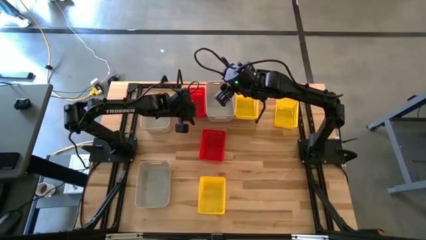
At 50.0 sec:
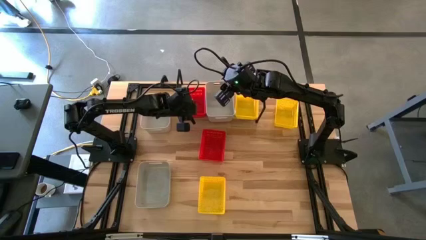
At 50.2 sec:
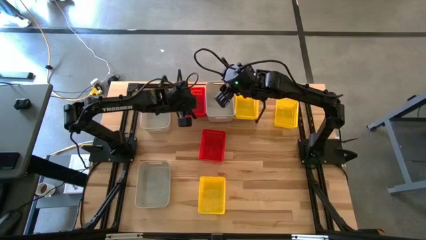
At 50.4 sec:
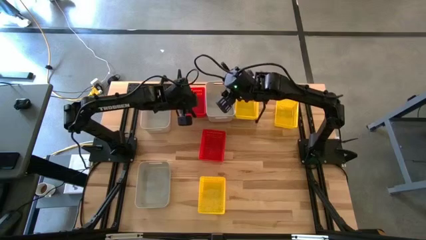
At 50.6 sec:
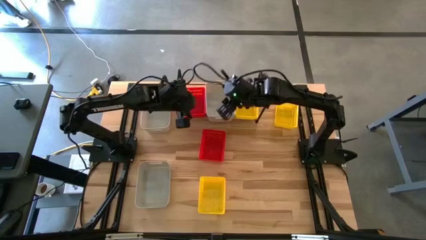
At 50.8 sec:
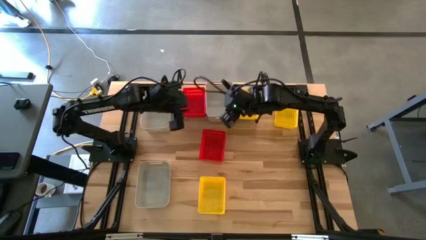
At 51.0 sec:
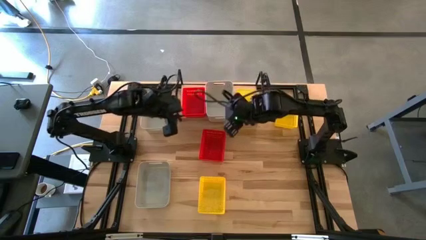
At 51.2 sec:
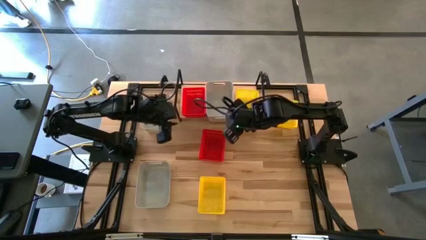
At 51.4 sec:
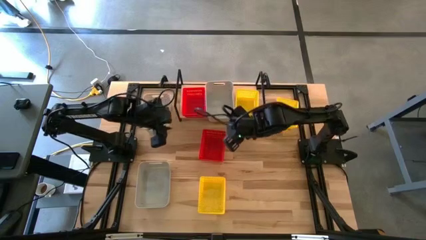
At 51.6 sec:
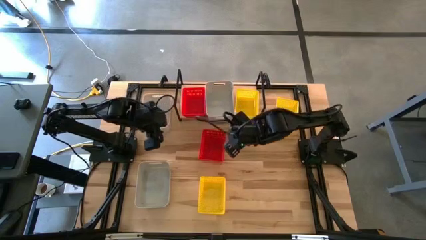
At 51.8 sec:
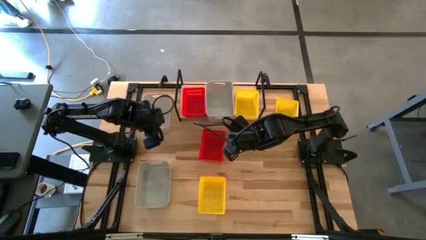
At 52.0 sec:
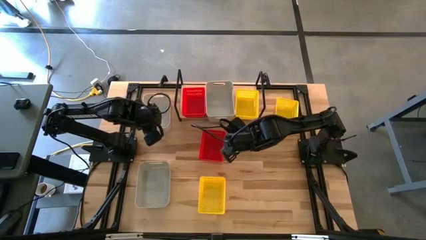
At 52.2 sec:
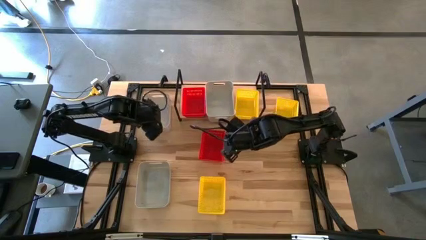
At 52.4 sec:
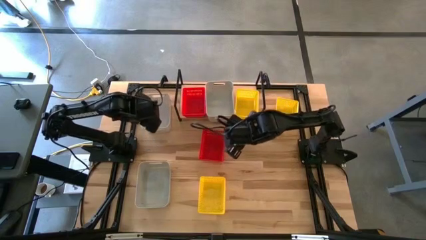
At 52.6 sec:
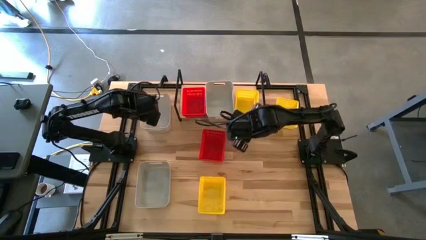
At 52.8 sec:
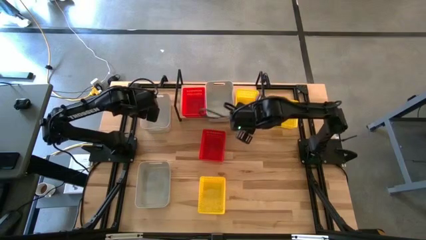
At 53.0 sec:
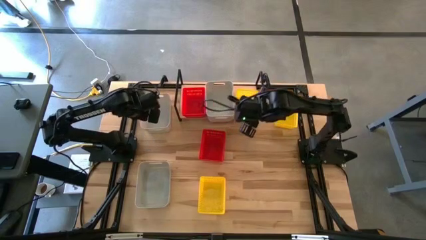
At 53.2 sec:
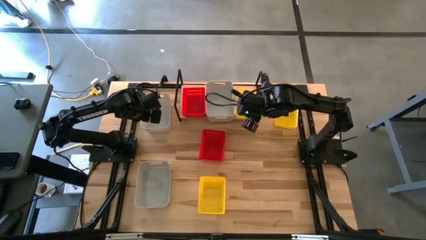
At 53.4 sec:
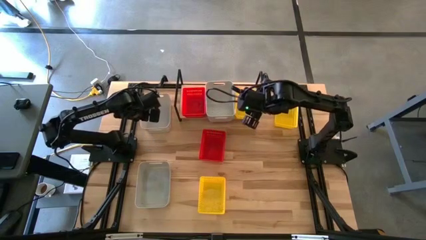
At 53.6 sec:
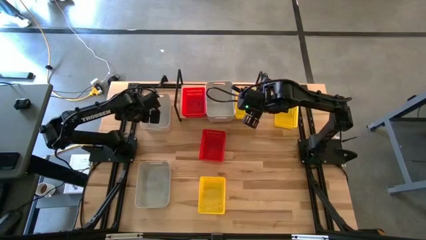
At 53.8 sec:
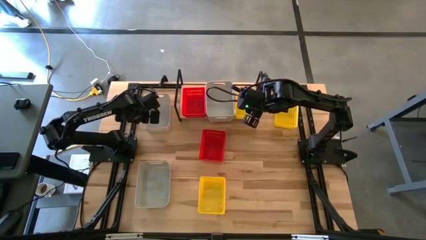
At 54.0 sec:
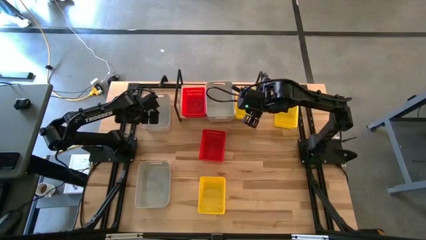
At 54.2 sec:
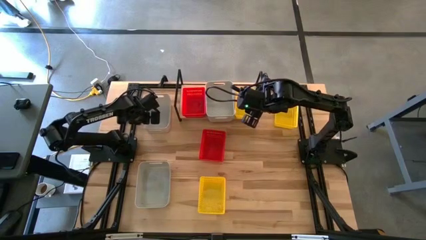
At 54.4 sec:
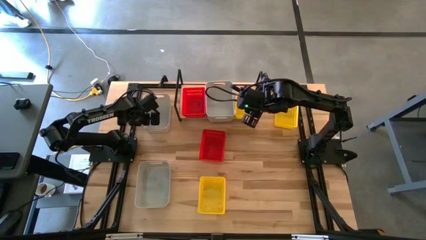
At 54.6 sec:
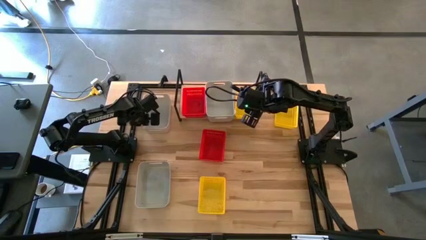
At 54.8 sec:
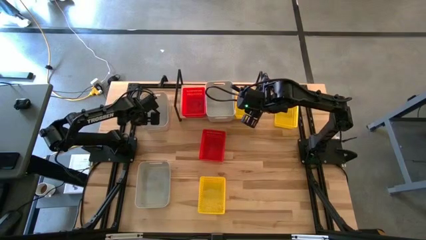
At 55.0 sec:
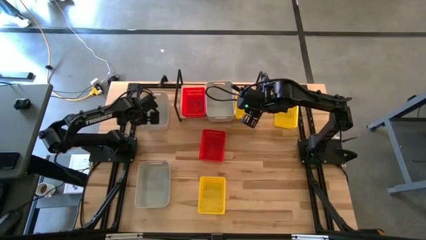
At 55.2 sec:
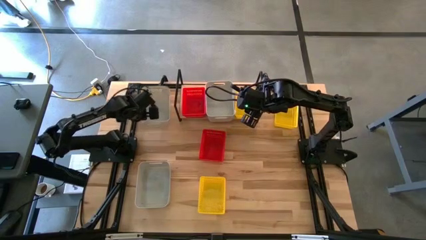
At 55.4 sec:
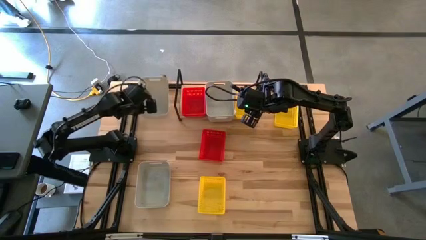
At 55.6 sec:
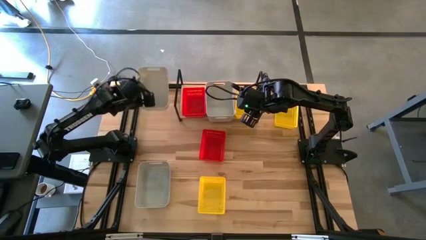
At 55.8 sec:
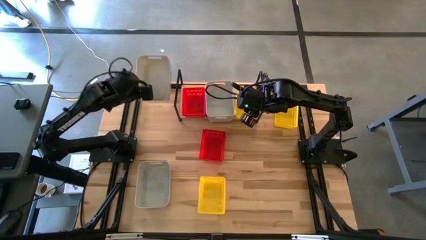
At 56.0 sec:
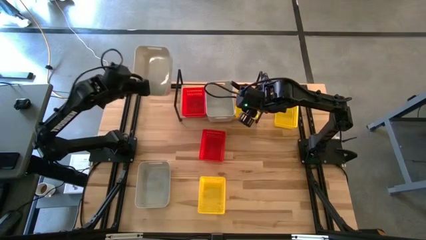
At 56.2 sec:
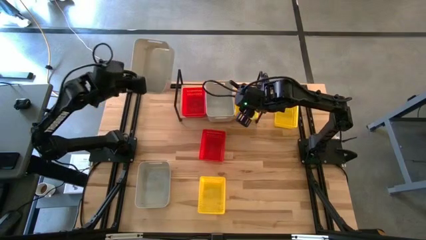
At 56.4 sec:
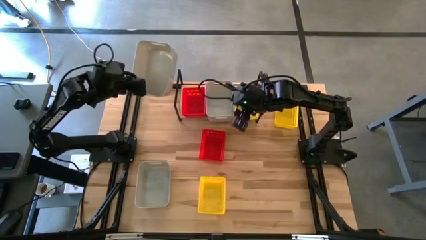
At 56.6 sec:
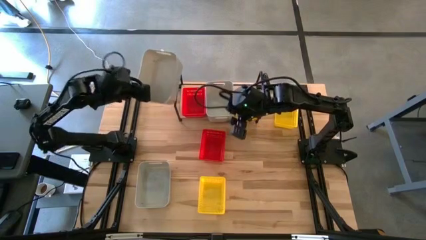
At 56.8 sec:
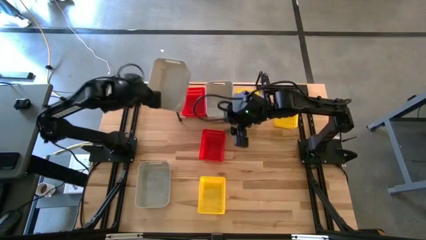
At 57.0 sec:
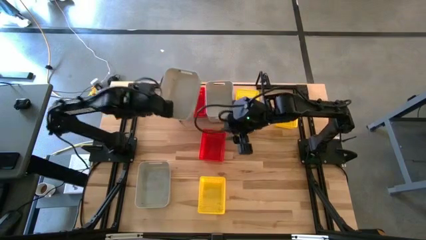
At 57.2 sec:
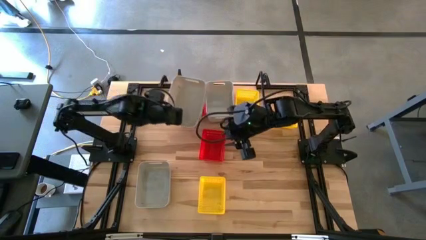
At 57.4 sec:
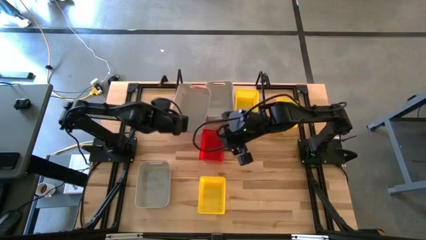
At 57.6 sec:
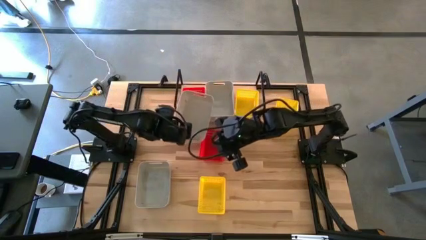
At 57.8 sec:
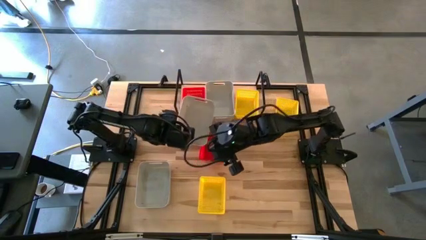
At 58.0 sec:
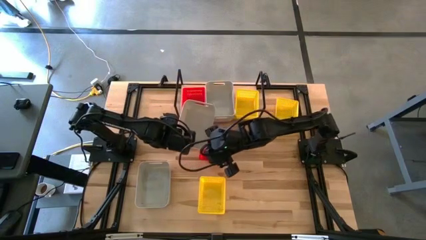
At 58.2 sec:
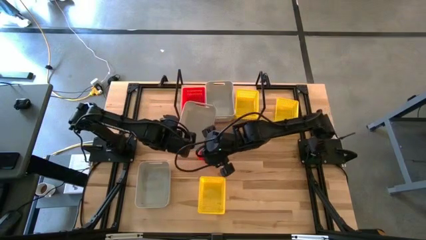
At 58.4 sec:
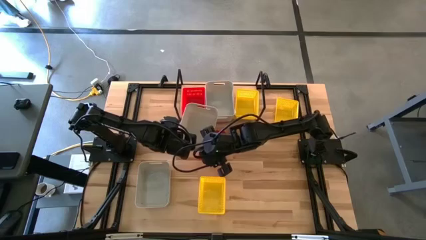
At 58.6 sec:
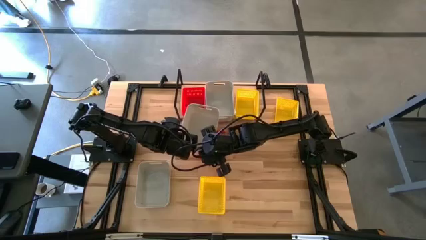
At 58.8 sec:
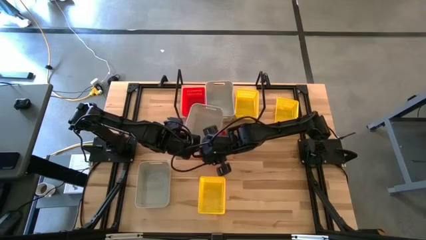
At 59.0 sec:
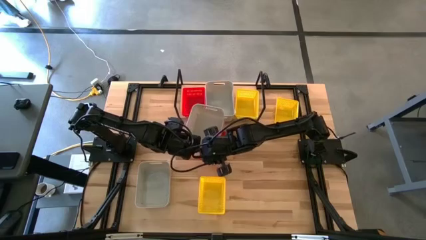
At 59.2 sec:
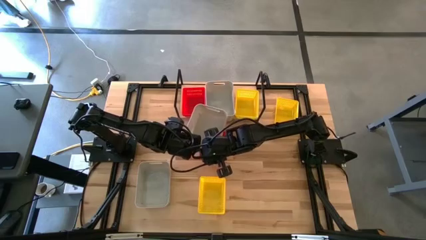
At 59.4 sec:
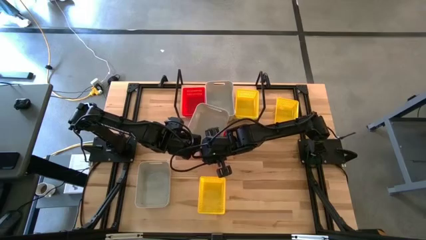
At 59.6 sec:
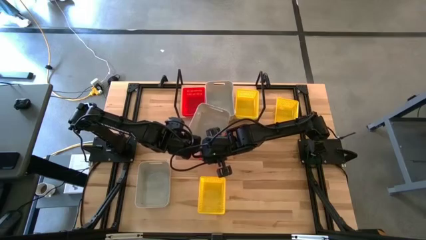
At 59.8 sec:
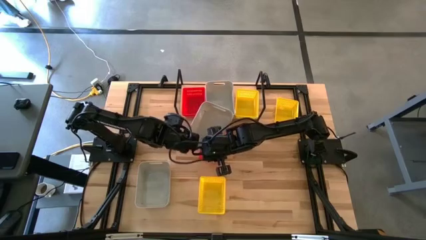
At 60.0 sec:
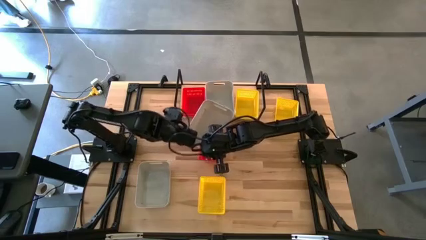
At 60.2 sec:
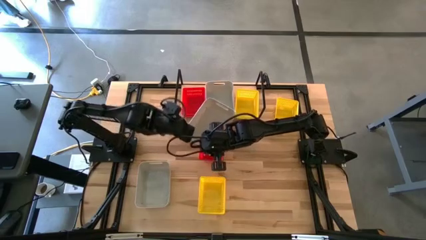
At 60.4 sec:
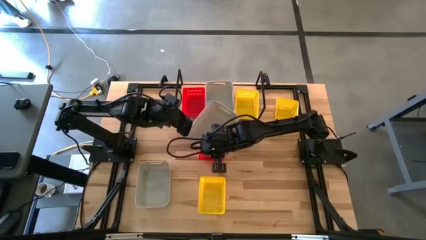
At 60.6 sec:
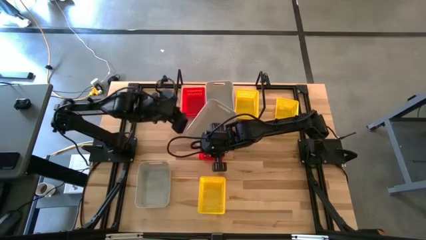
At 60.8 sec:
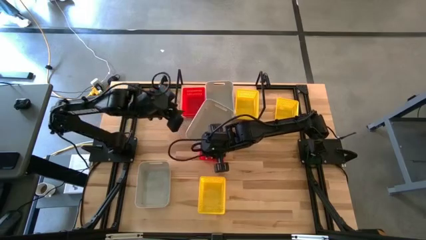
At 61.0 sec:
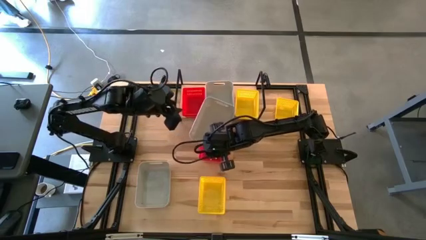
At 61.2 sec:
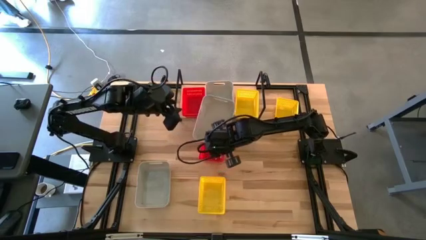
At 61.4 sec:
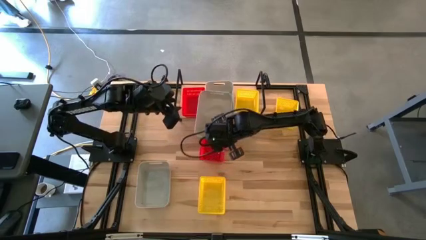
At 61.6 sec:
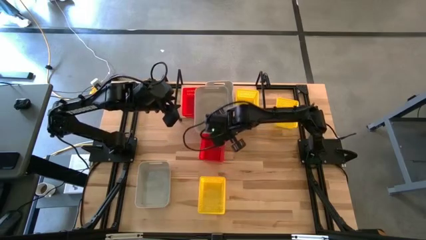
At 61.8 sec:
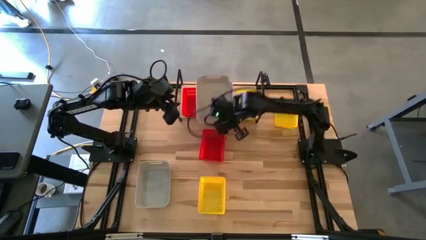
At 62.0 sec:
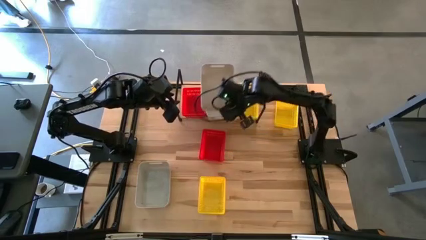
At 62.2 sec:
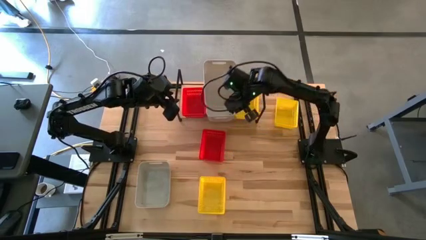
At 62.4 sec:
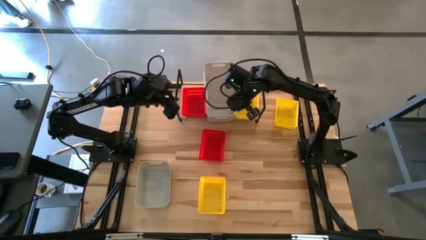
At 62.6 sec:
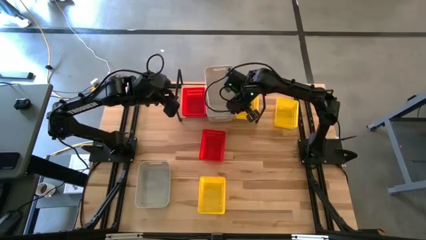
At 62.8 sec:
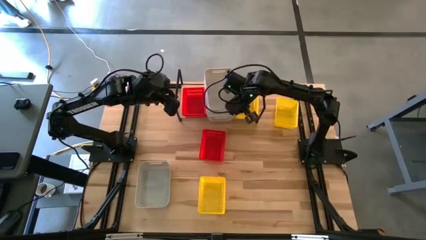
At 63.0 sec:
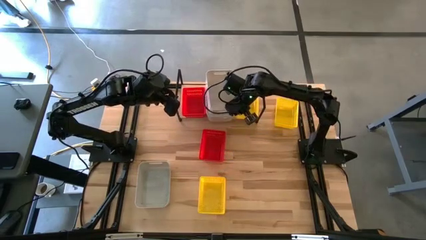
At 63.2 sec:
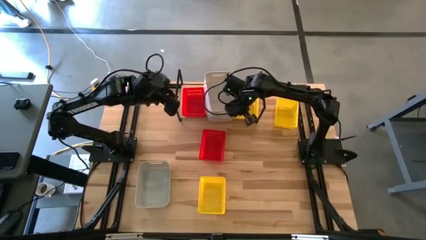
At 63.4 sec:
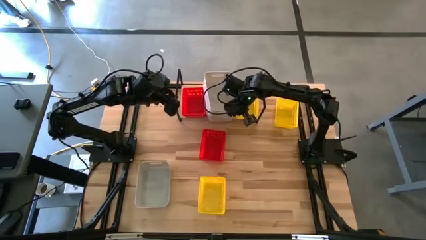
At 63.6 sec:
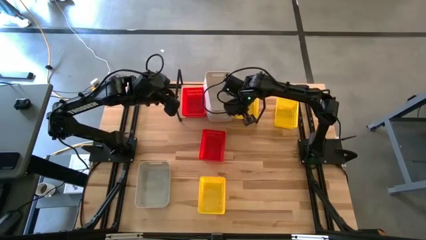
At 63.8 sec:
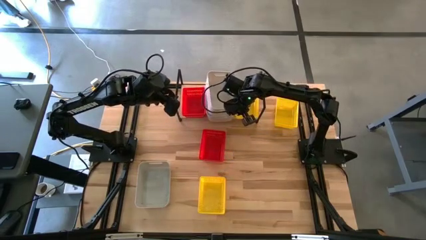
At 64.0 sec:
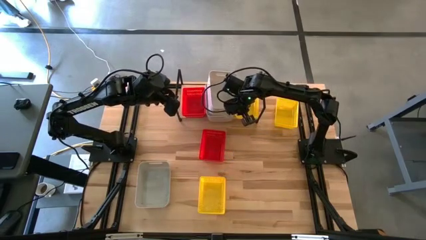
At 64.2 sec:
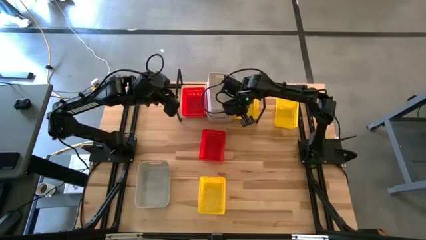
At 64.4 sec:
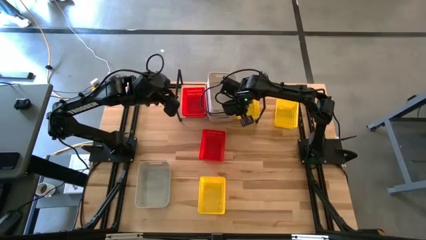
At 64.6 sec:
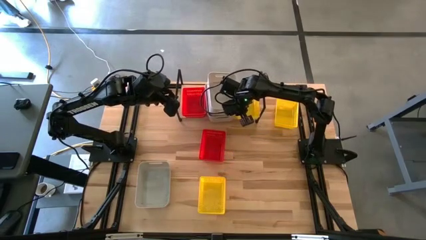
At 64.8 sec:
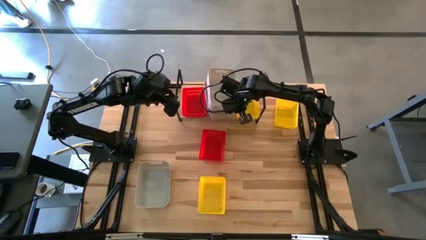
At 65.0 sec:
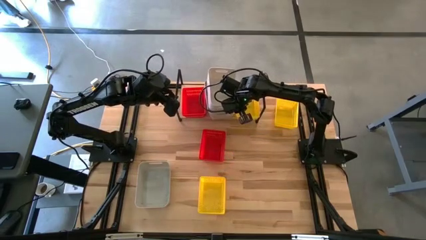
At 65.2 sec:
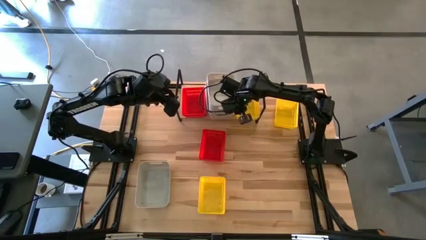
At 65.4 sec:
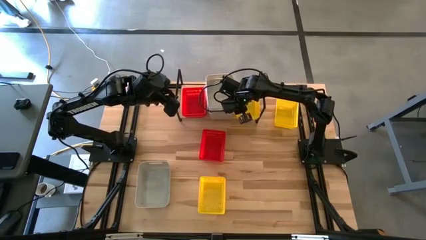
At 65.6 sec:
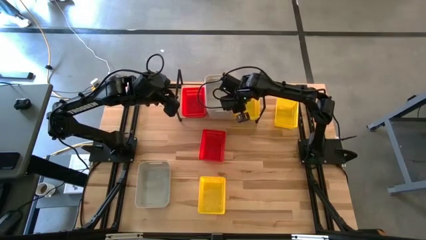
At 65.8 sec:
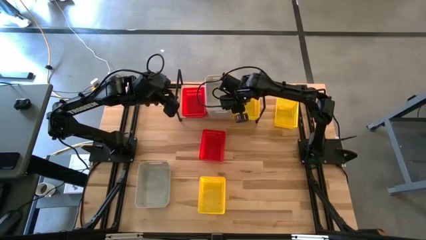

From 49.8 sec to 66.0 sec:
Task: Stack baskets on shelf by color
Stack the top gray bin on the top of the other gray bin on the shelf
